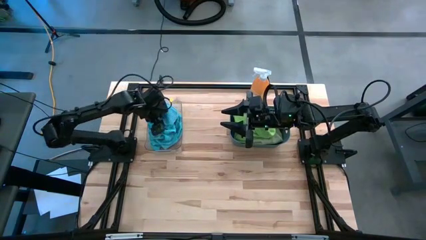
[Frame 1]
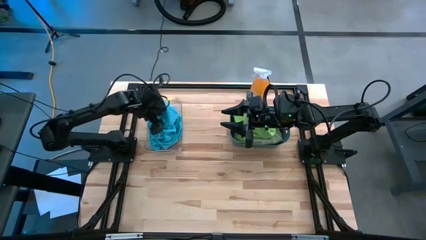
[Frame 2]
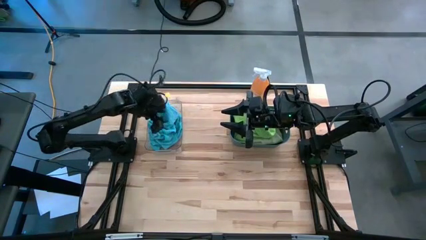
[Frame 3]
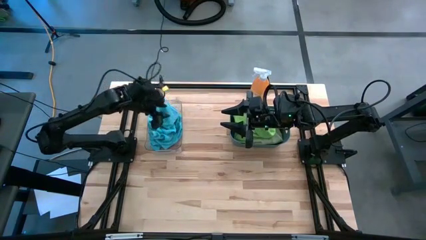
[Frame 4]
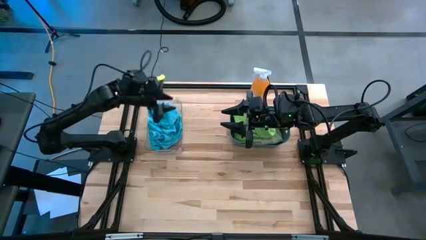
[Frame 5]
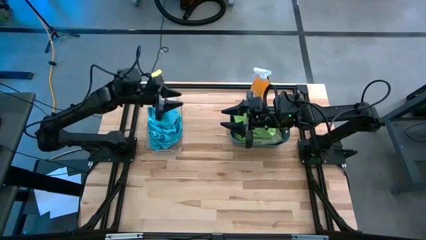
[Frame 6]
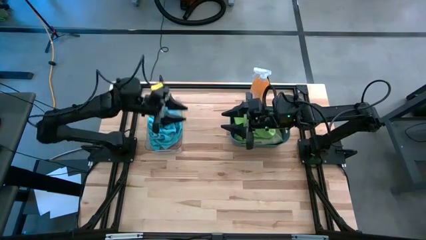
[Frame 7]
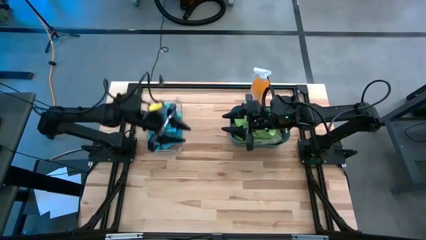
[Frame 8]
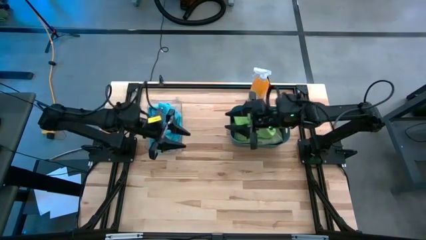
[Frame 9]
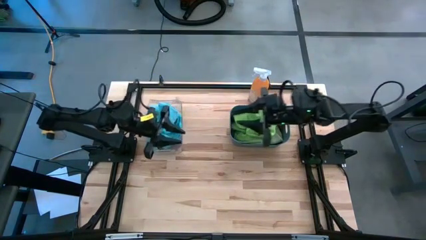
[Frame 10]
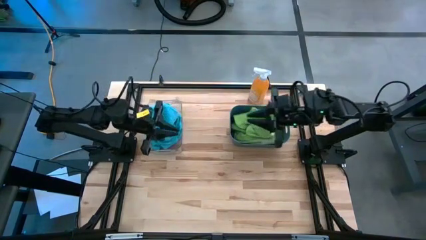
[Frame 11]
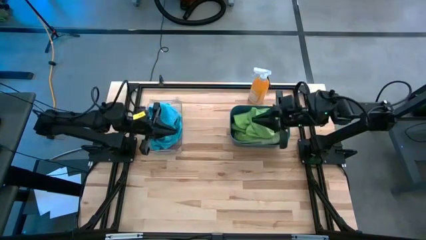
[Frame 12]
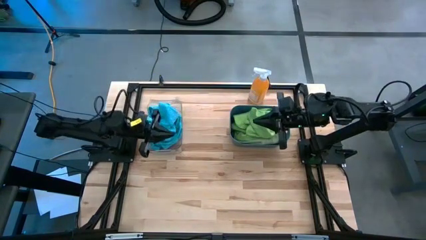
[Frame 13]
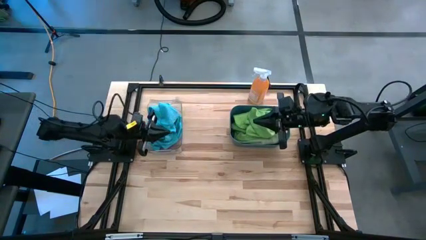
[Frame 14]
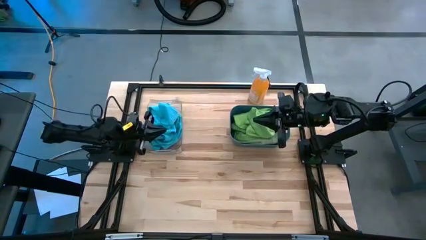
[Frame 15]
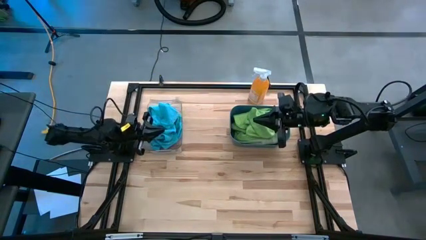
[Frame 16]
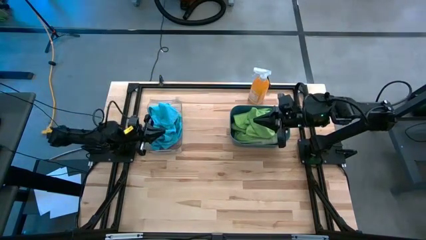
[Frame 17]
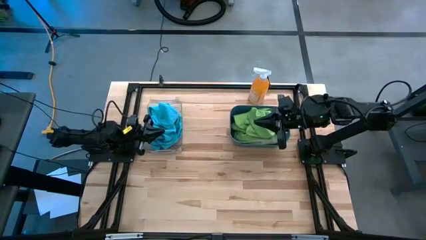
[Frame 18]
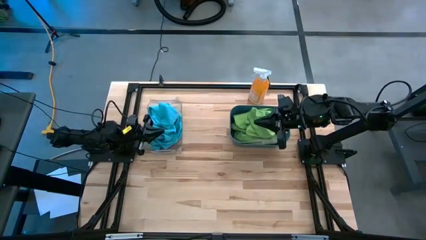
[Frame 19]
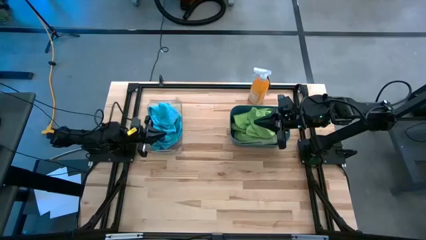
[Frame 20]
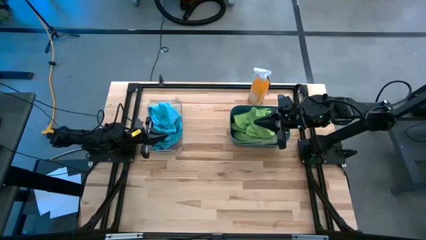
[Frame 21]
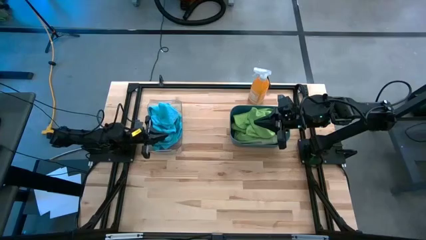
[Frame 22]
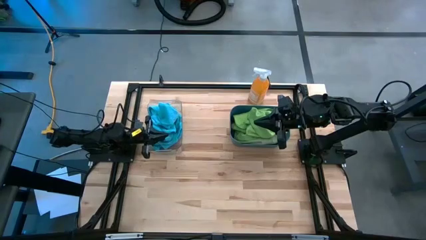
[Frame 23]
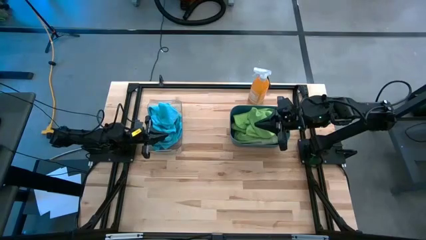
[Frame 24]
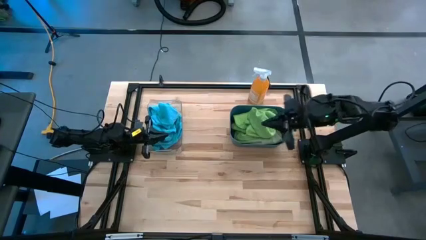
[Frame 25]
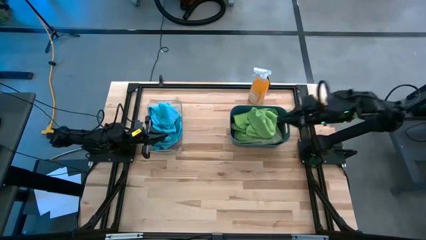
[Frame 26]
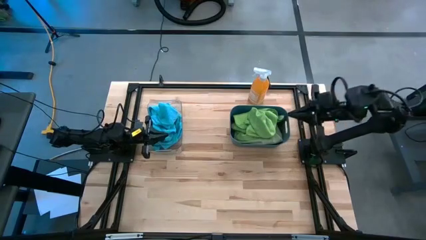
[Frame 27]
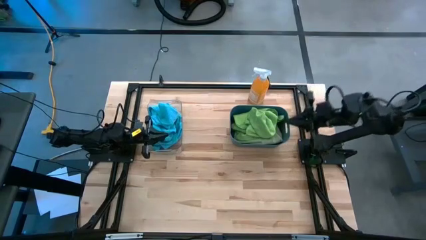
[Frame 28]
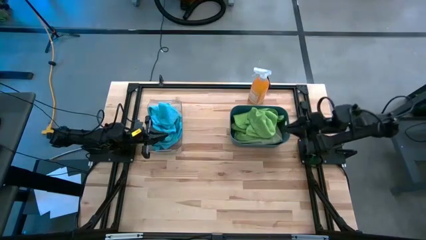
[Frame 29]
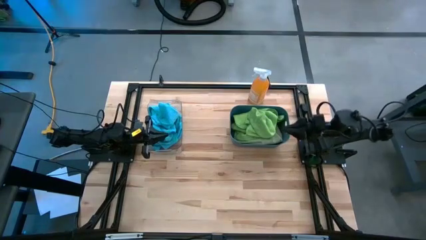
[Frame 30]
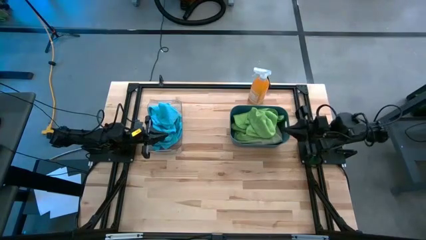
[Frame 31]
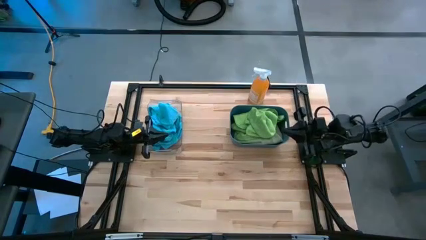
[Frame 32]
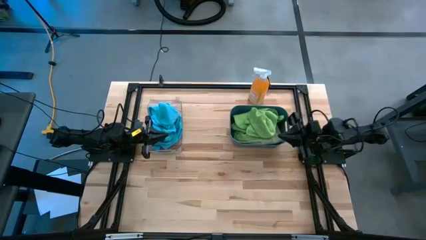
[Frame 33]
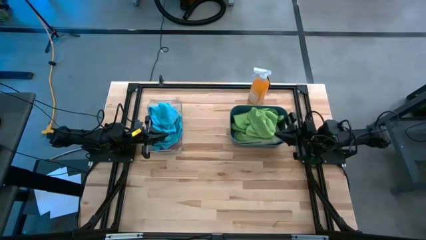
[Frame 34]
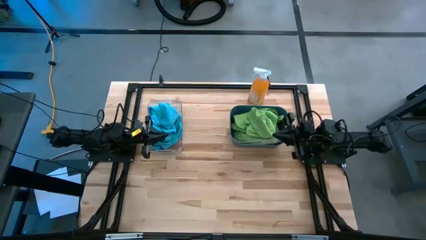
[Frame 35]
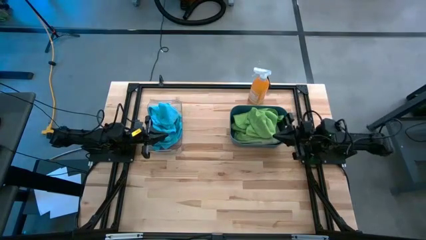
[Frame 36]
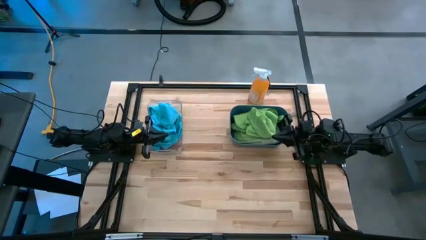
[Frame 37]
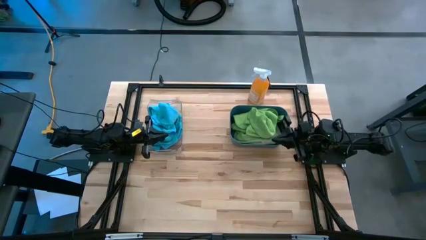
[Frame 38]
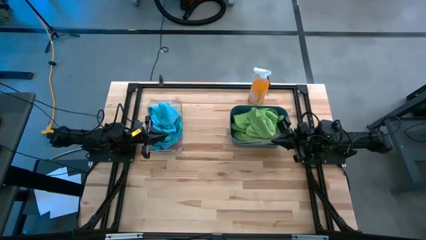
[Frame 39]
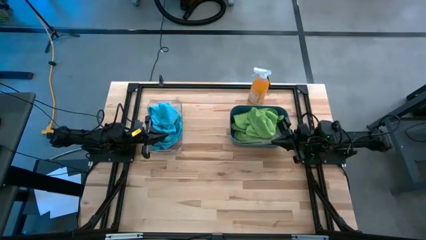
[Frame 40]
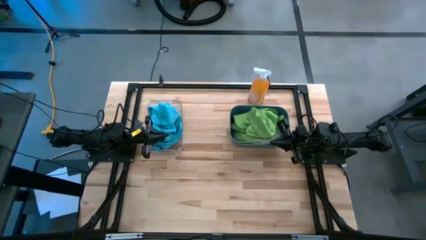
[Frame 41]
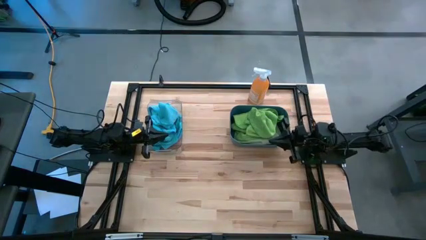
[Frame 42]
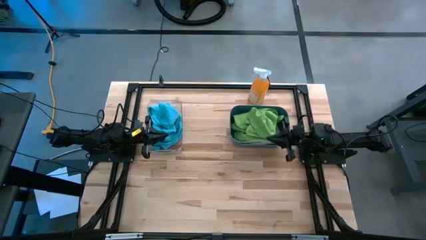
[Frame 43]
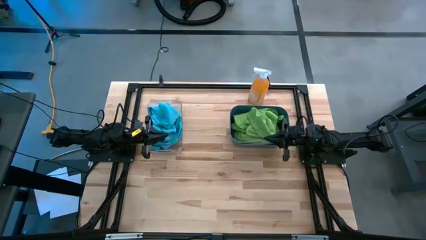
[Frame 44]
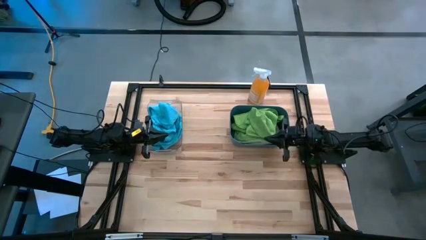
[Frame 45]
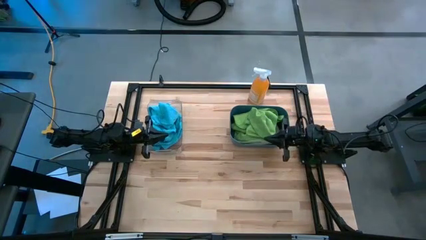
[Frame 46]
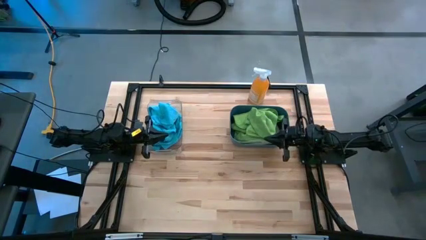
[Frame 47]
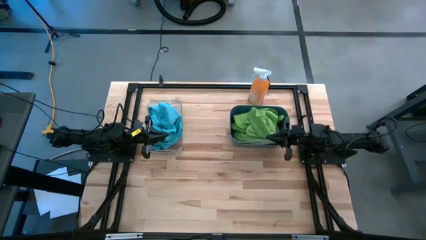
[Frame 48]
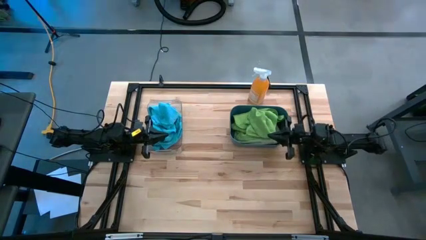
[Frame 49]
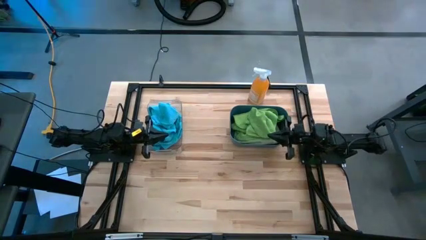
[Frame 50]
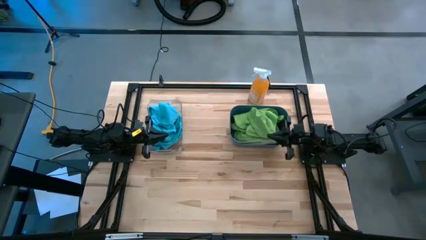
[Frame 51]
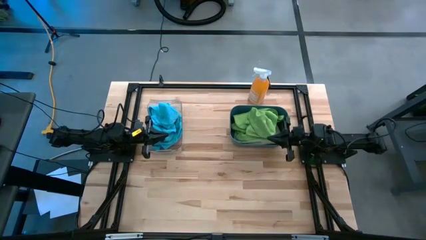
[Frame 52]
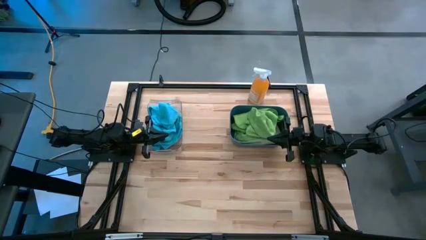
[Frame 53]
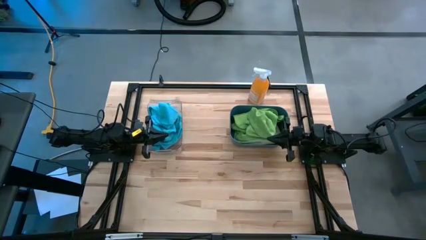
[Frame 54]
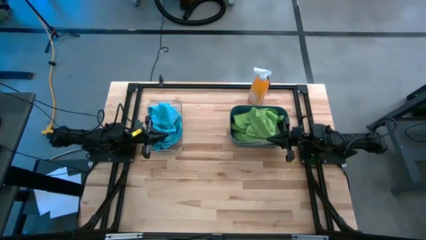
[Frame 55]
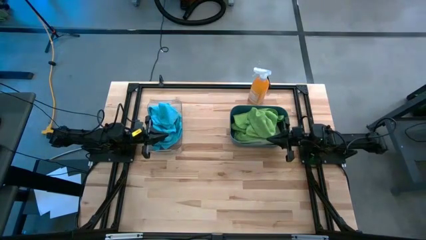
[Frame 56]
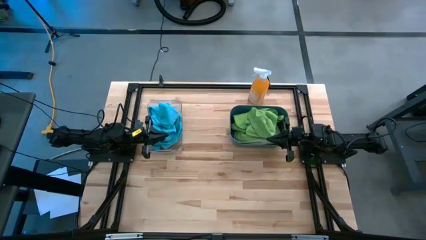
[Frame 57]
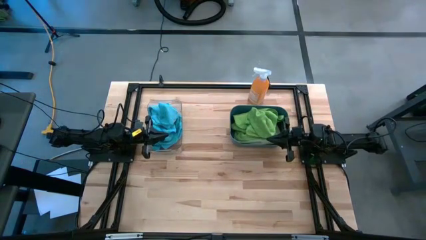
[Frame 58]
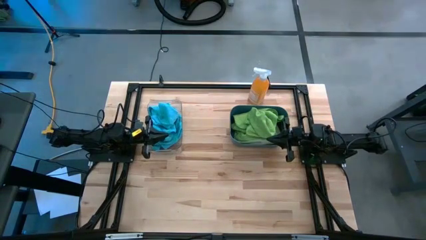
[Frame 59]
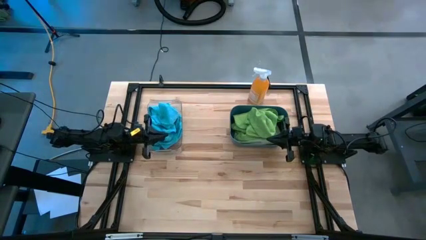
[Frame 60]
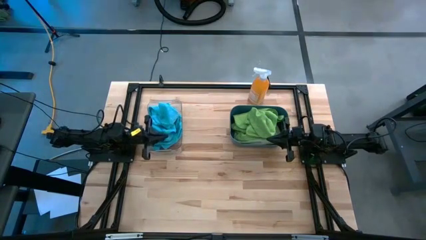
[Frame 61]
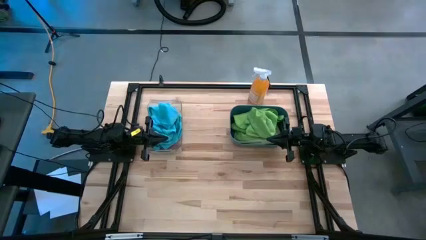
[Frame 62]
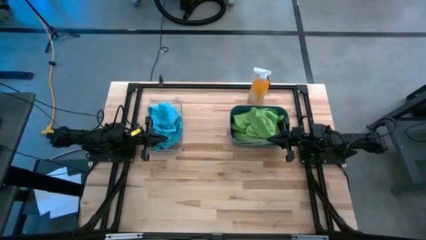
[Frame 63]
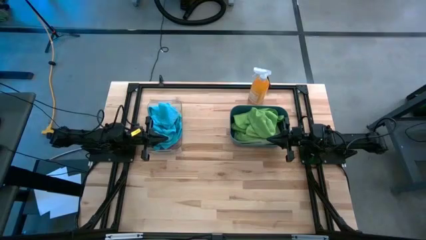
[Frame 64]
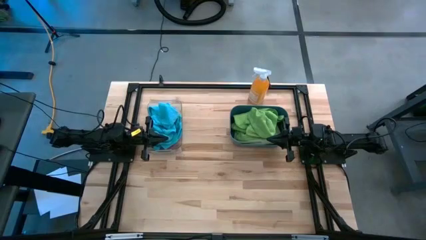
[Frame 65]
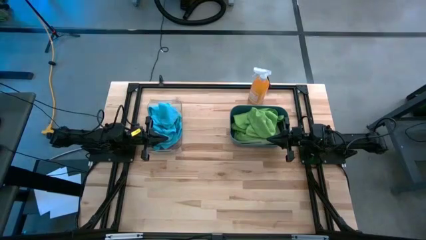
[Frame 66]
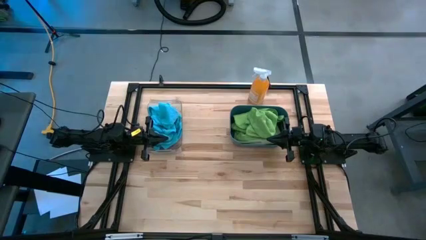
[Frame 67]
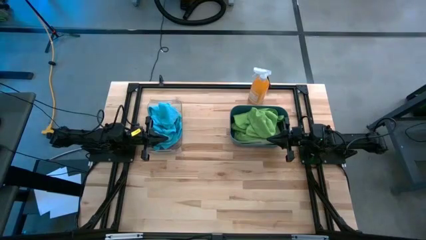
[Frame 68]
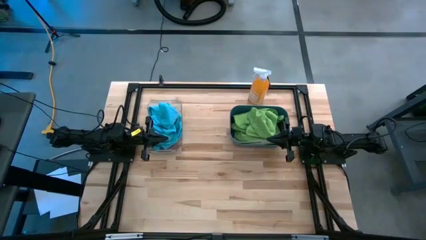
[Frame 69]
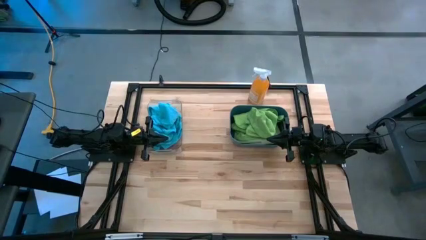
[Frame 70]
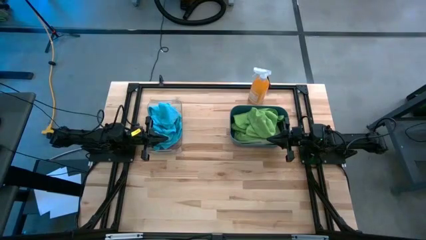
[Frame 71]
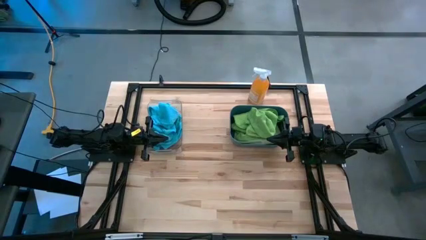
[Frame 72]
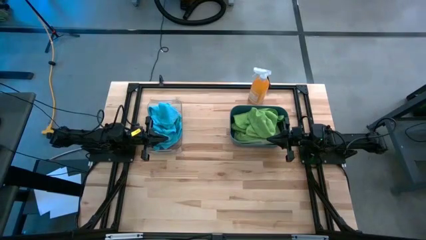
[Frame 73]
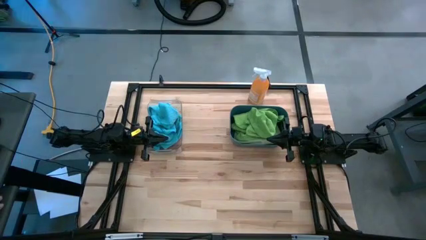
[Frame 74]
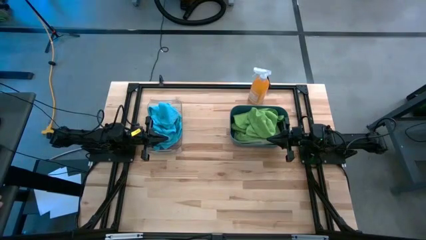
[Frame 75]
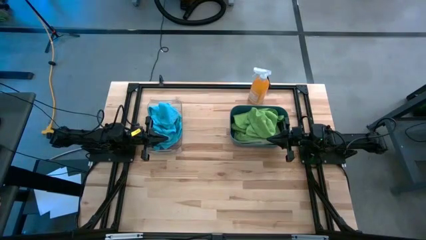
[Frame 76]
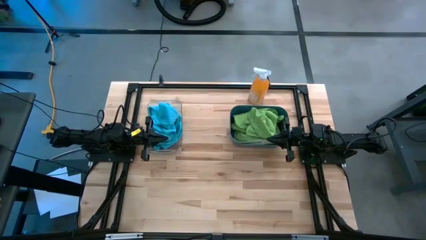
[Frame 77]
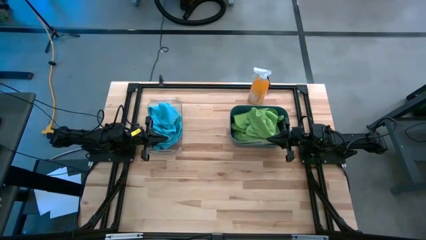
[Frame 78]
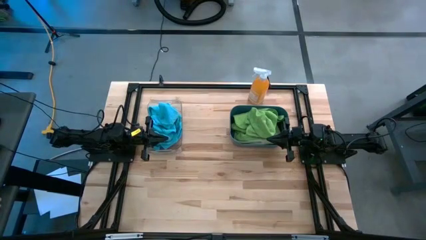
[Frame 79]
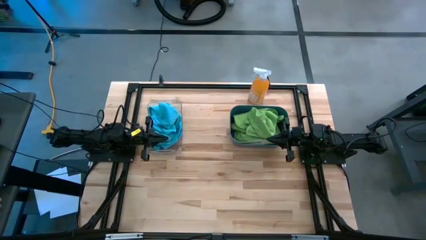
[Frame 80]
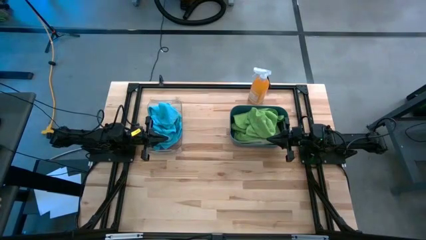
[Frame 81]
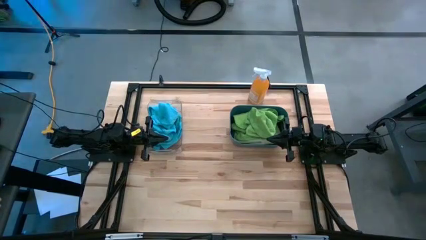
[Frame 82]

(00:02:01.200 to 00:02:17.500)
Task: Sort microfiber towel by color & place in baskets
Return to Home Position

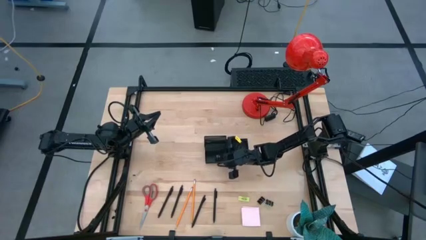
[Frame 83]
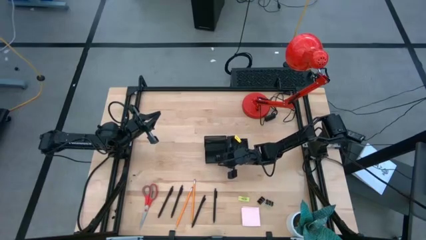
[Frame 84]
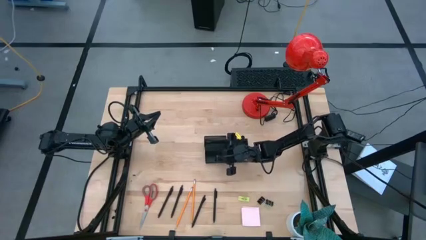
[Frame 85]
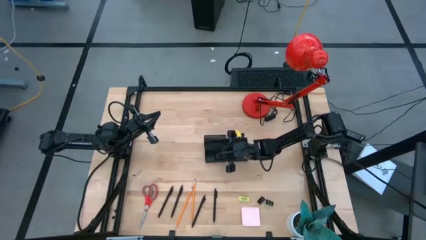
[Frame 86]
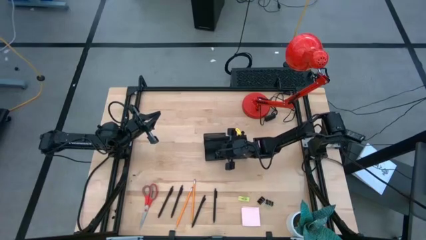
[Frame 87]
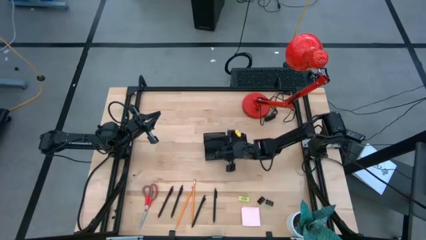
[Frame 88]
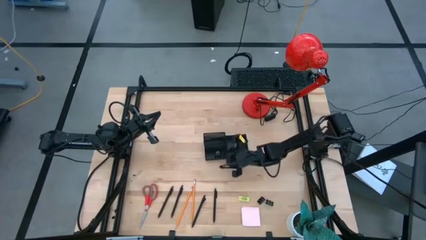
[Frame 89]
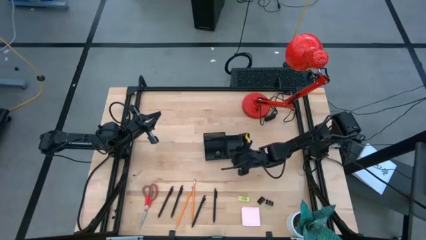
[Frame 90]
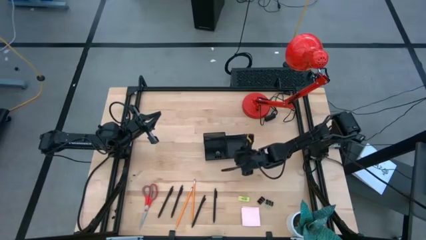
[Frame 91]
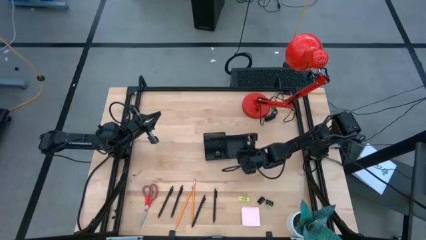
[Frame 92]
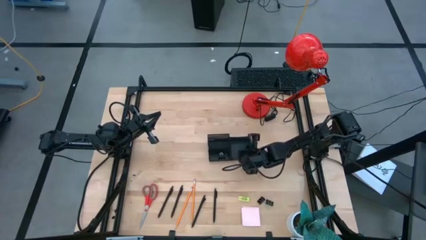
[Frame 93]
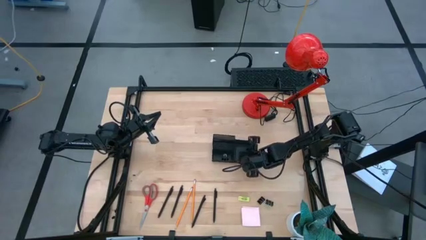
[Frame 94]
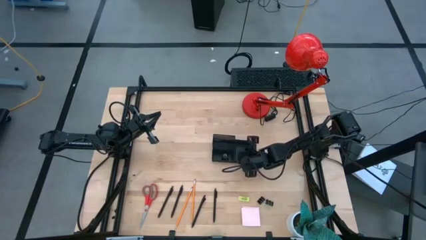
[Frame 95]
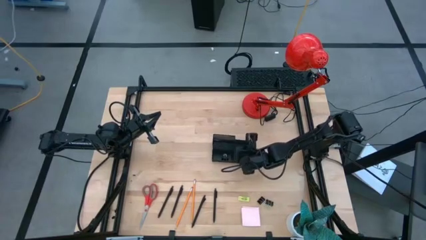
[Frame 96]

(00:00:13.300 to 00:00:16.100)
Task: Pick and place office supplies into organizer
Adjust the black desk organizer
